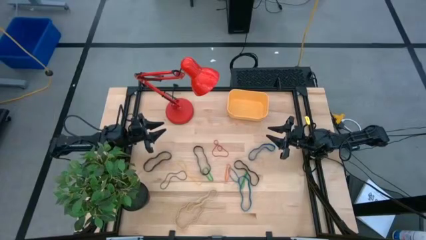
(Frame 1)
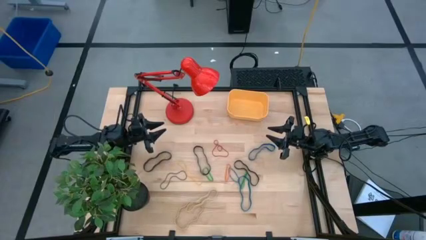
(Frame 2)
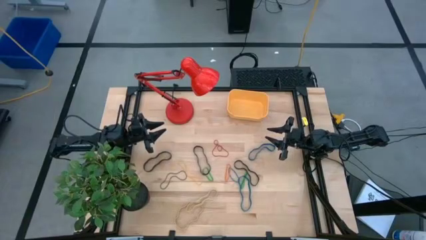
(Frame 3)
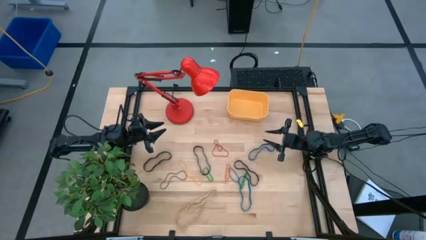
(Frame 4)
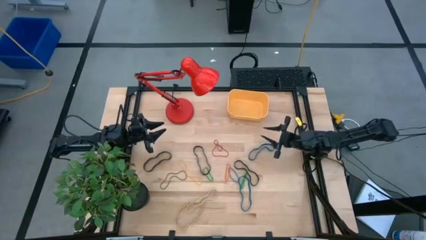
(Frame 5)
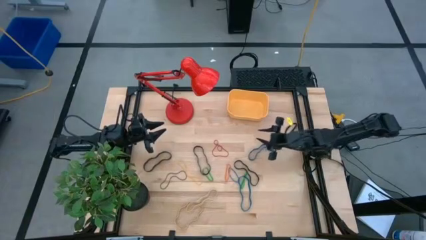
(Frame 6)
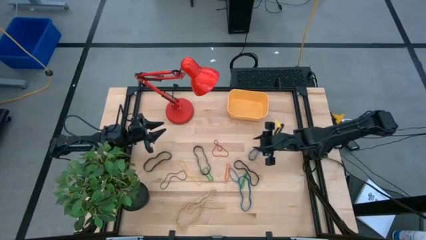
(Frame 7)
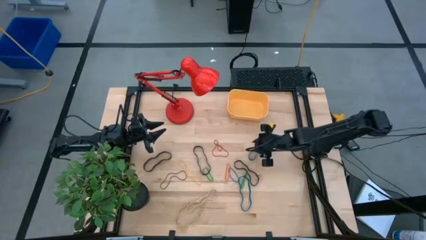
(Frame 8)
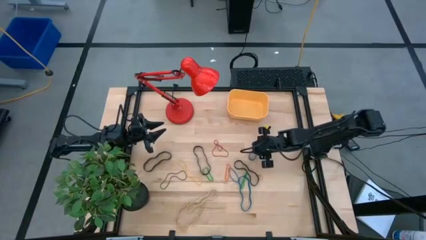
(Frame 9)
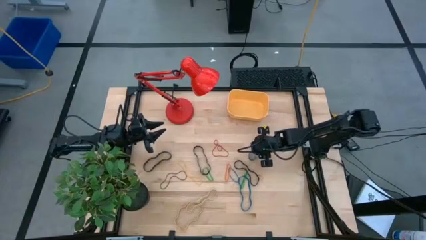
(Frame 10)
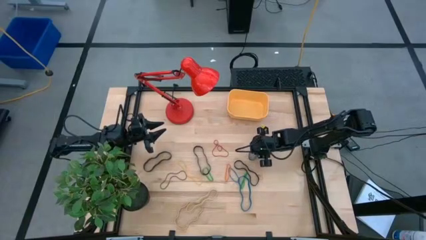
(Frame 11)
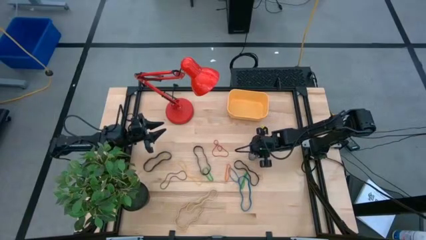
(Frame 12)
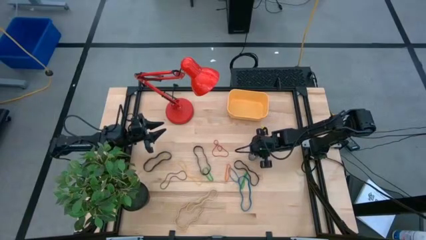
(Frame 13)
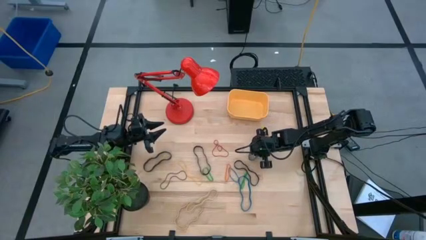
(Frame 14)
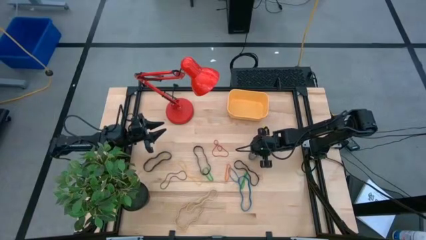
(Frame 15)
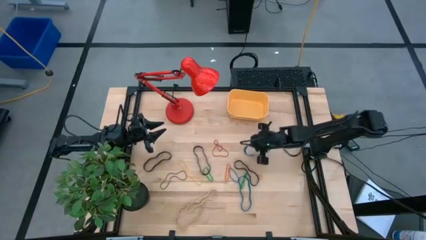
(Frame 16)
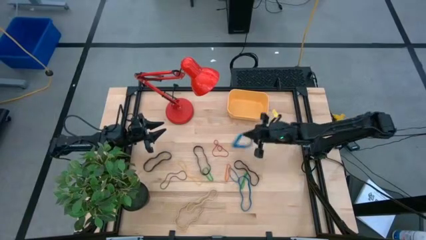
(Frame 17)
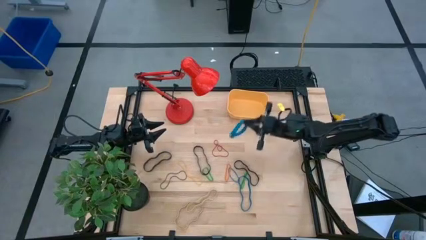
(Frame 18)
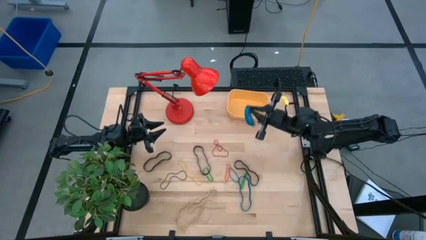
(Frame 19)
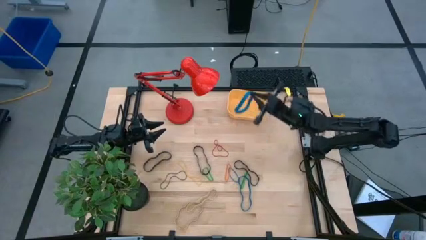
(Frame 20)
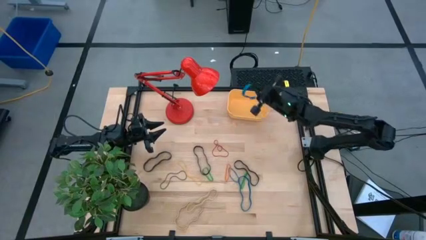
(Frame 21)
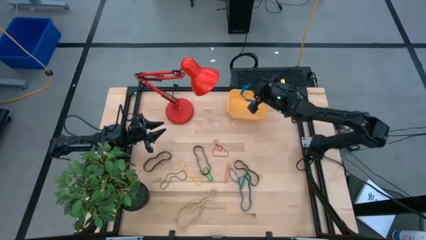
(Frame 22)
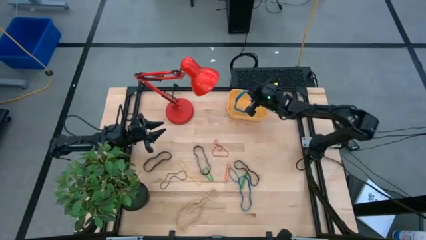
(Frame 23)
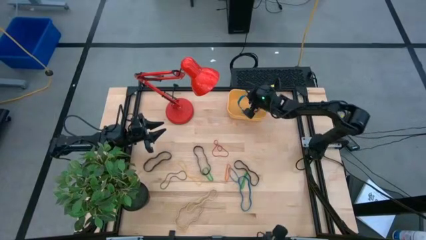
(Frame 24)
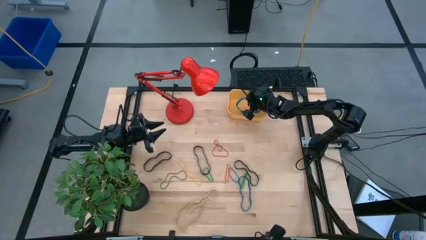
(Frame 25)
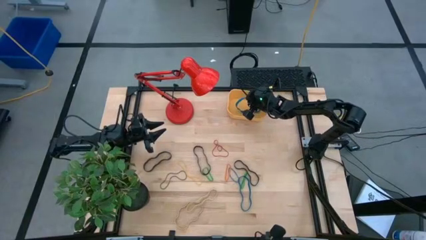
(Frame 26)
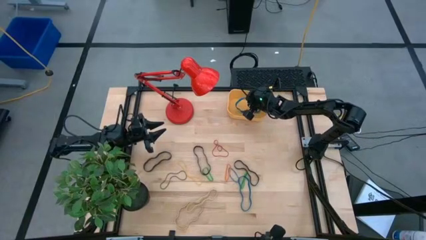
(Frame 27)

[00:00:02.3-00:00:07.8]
Task: Pick and place rubber bands into bin
Put the top blue rubber band into the yellow container

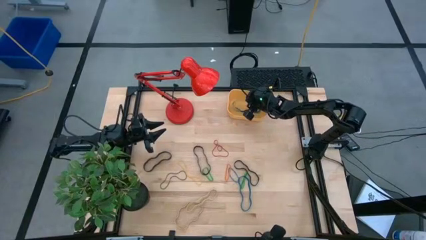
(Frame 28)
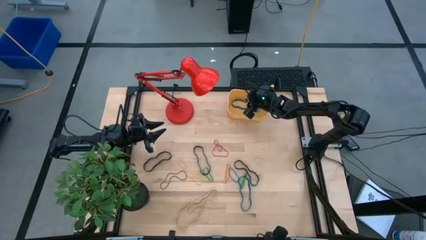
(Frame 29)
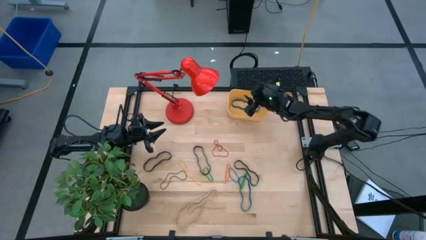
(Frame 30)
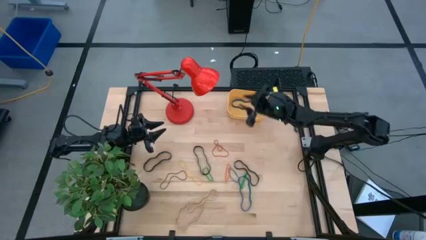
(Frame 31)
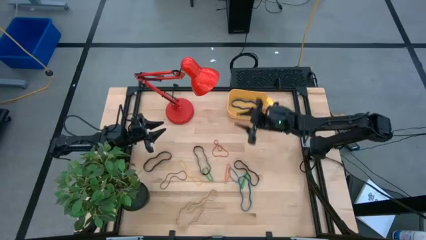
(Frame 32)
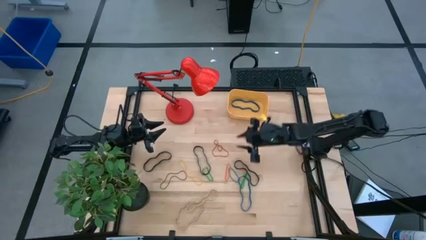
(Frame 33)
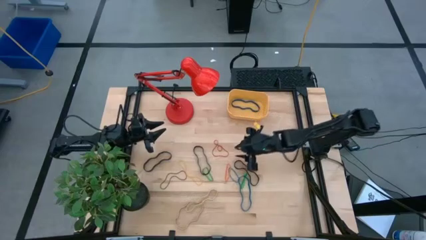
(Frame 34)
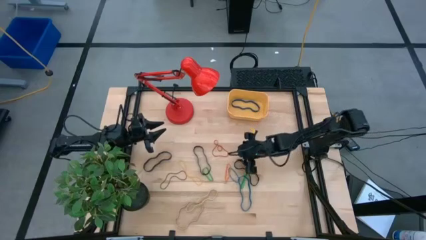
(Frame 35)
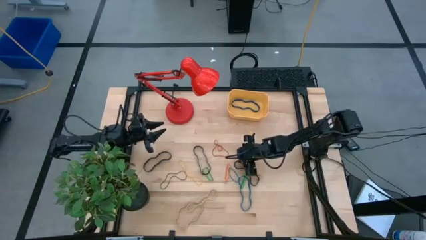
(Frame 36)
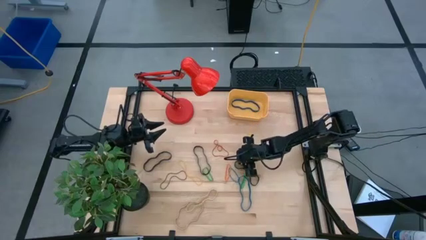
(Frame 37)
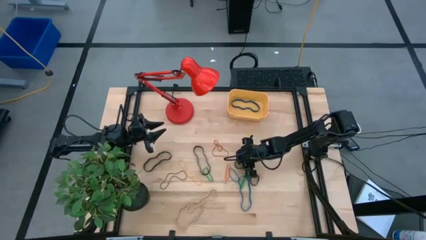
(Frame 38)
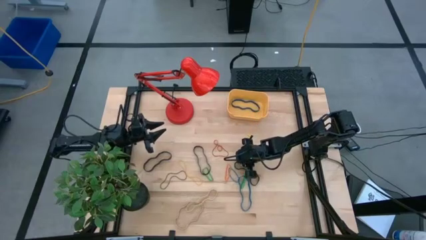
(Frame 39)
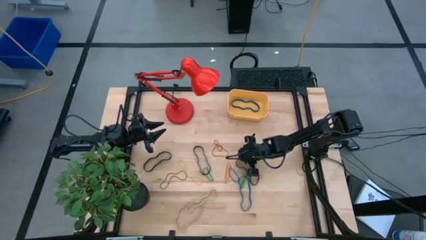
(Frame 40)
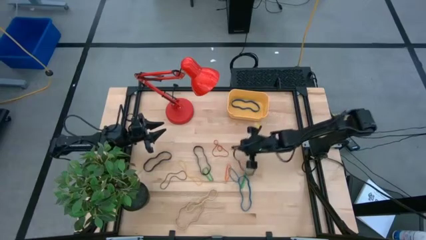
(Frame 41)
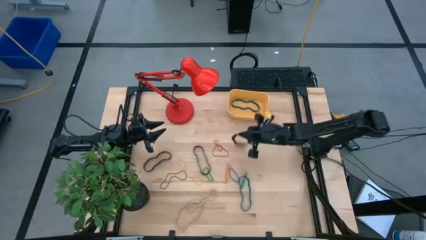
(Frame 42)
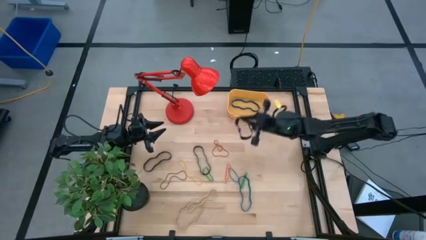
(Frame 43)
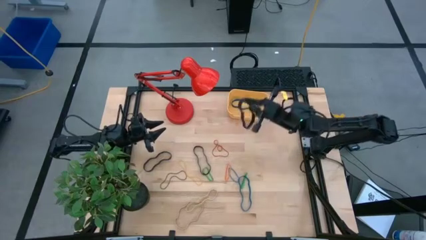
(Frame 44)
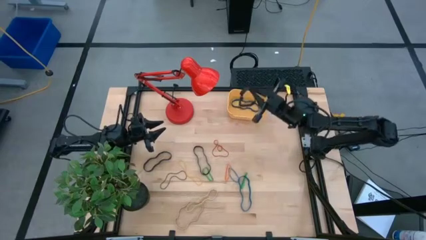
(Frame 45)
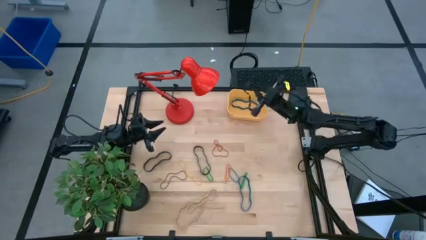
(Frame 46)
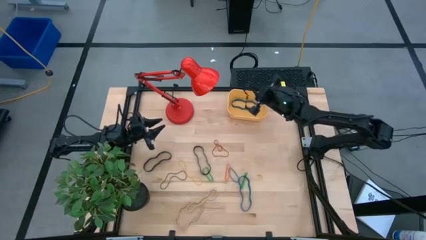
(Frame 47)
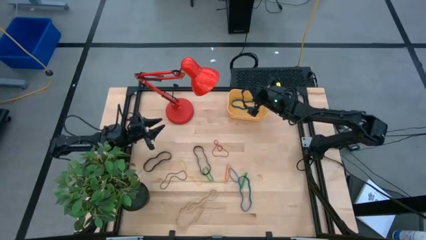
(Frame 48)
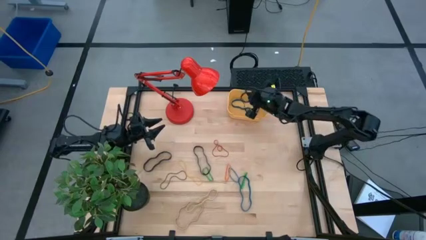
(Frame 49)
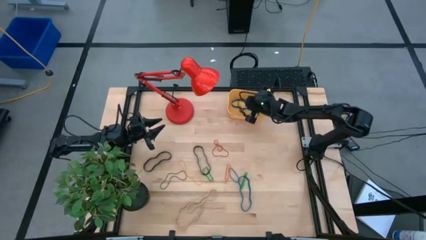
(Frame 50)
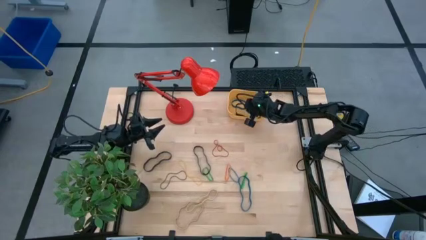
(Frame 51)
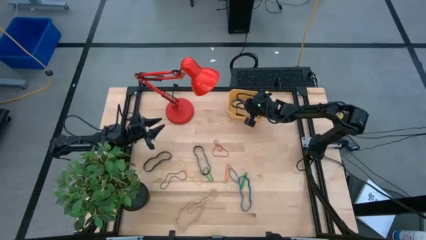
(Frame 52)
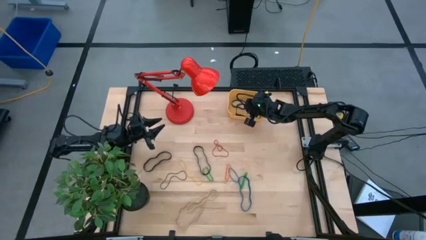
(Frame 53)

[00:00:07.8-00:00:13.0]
Put the right black rubber band into the yellow container

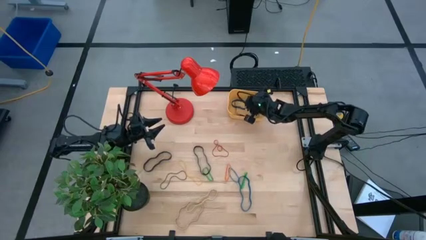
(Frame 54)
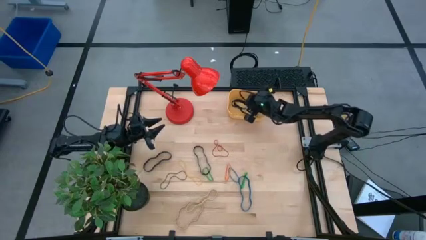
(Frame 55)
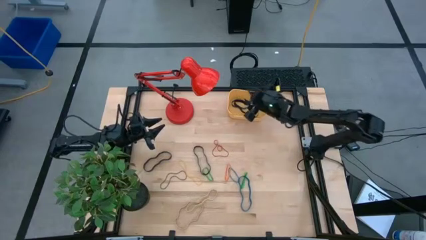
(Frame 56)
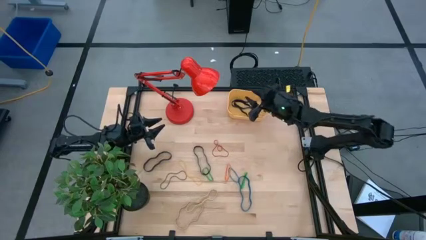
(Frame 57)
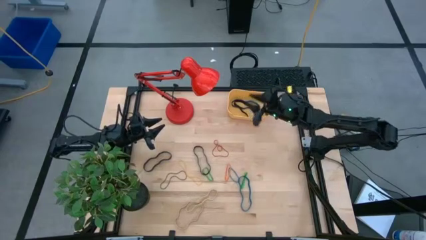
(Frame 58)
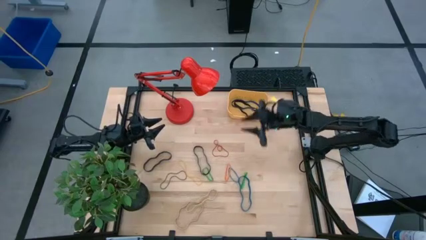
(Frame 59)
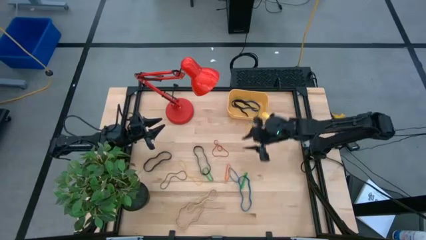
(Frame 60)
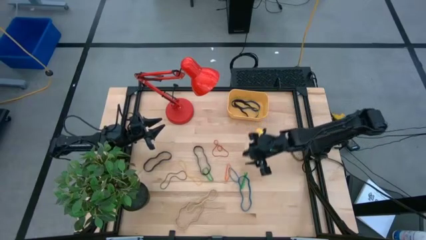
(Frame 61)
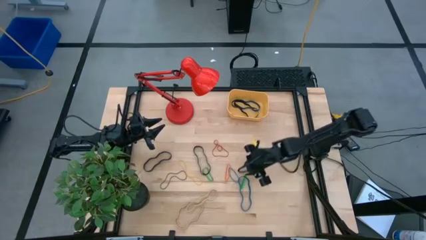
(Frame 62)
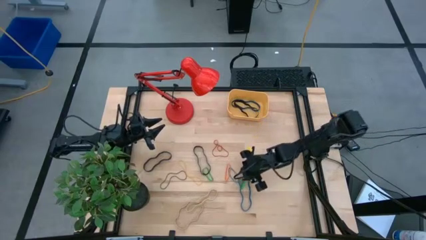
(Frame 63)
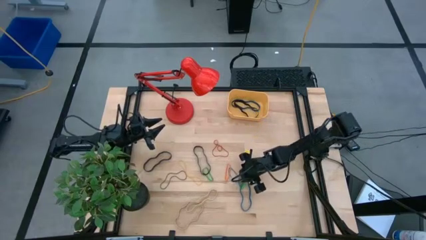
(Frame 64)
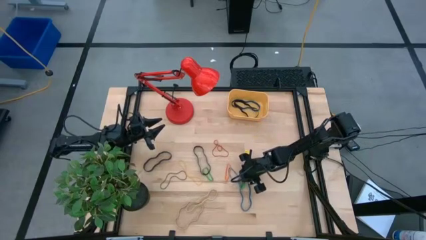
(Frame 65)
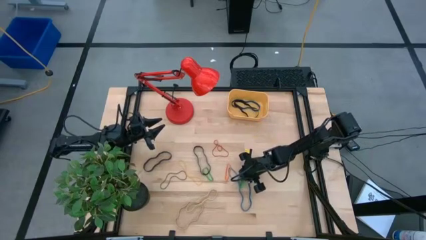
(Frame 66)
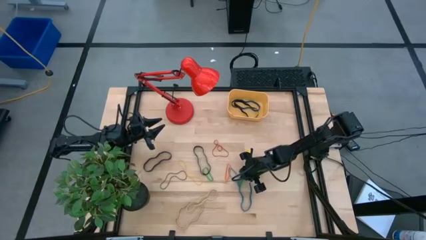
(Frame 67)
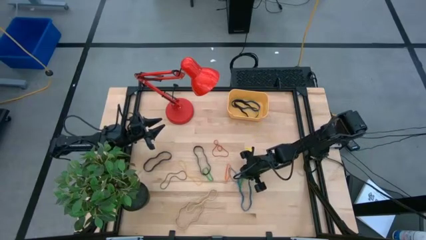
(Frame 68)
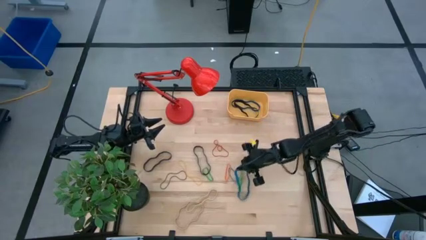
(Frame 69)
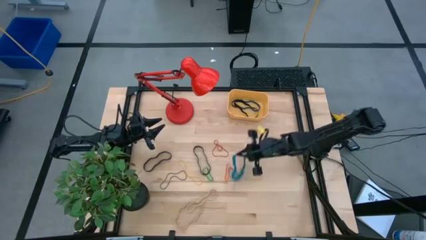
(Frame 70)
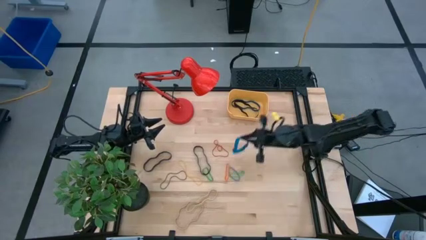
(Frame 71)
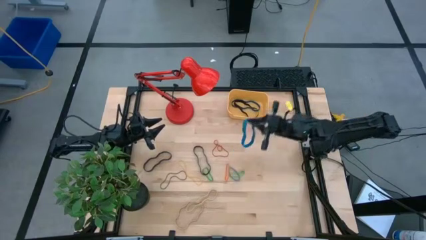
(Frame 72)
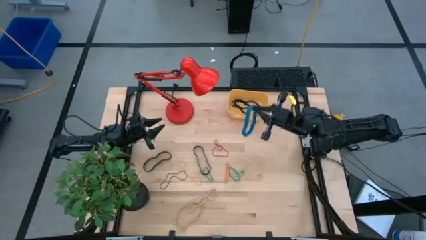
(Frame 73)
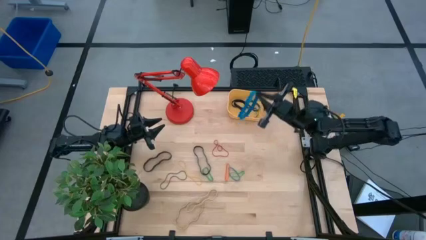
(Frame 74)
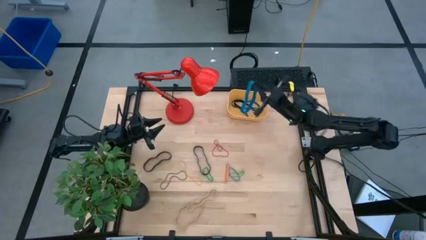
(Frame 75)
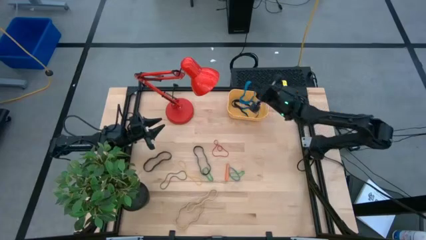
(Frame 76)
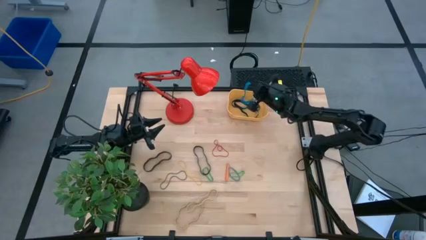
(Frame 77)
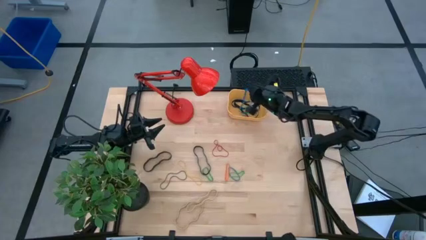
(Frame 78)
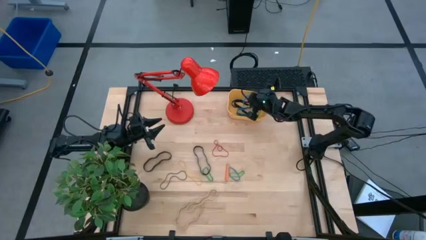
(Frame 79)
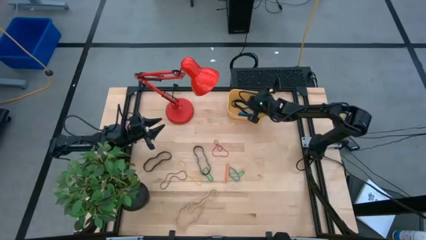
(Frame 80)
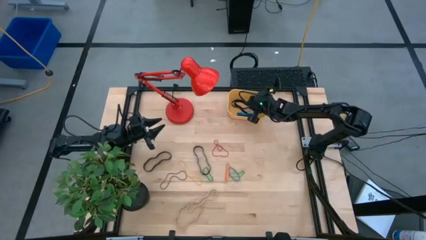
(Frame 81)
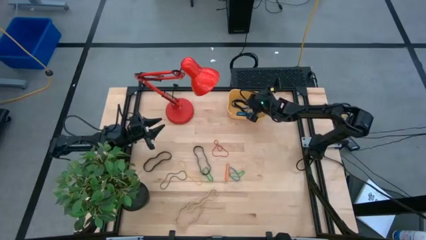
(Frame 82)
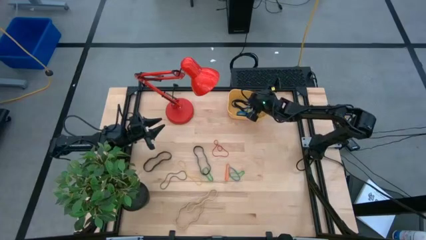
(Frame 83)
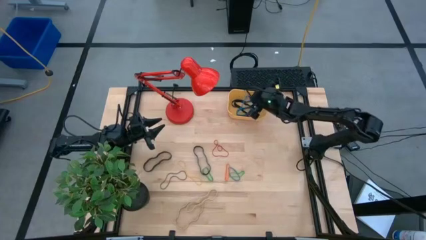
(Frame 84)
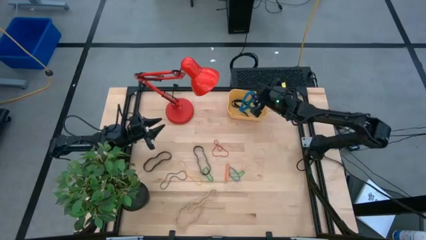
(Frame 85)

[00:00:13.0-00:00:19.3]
Put the bottom blue rubber band into the yellow container
